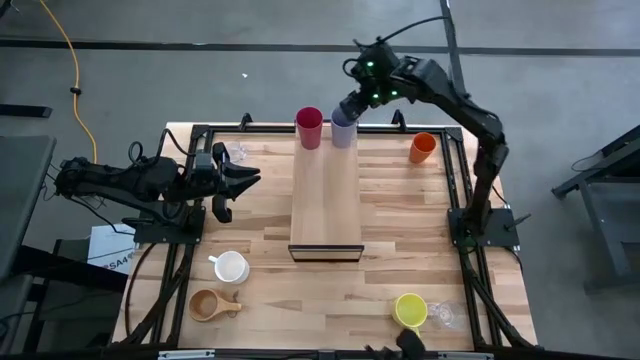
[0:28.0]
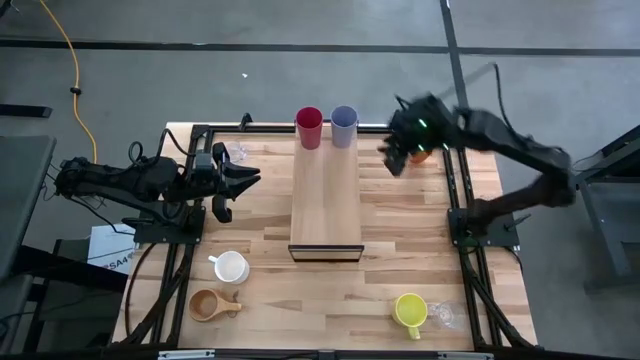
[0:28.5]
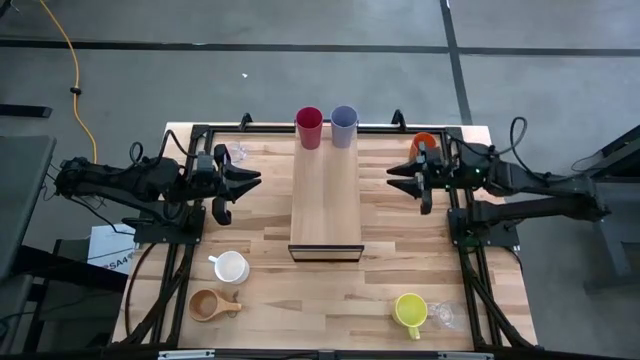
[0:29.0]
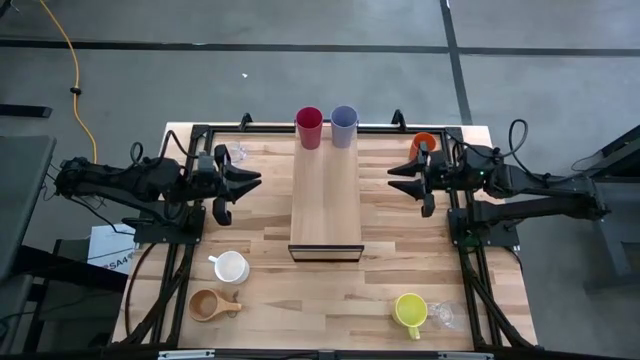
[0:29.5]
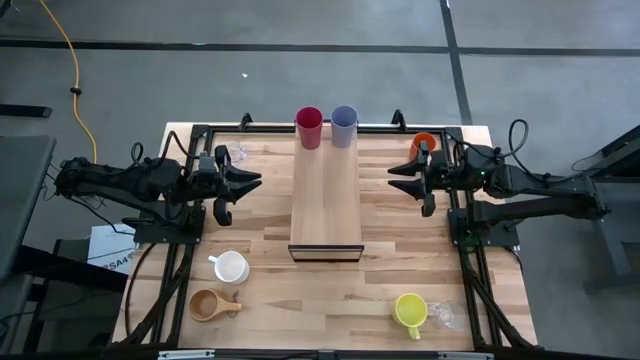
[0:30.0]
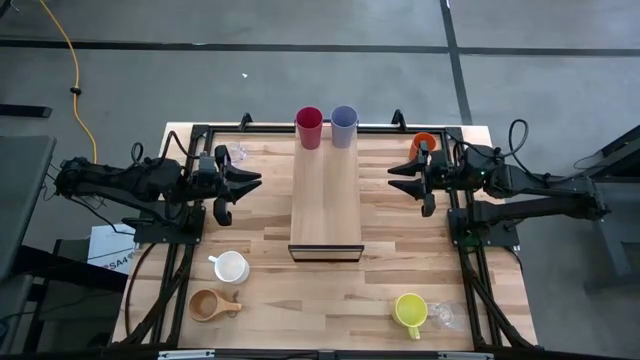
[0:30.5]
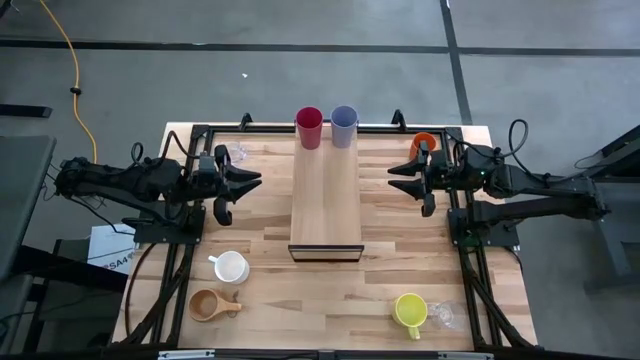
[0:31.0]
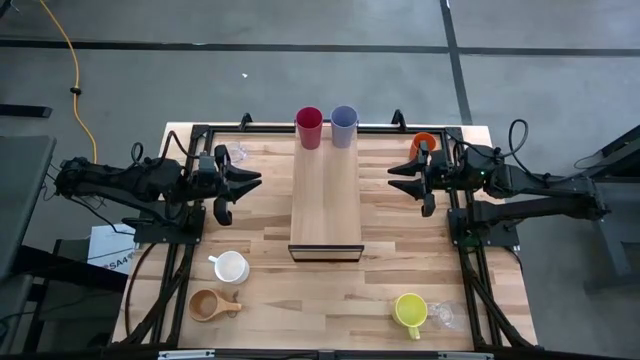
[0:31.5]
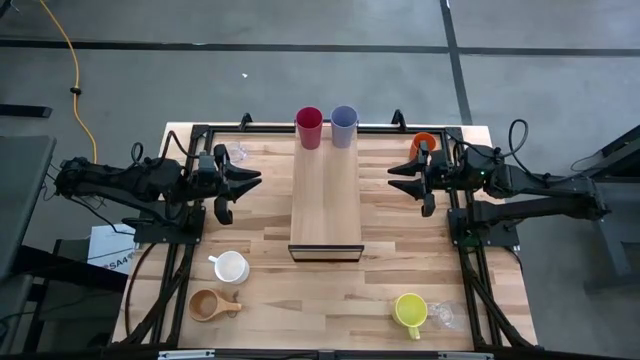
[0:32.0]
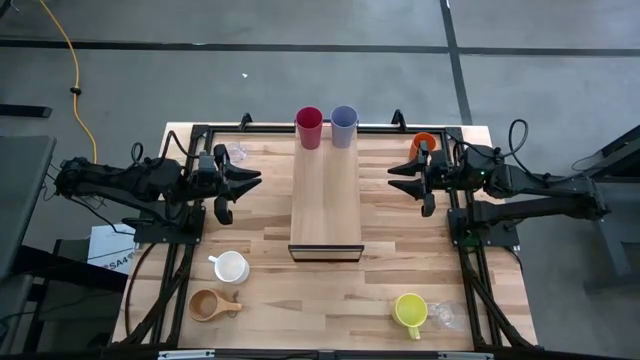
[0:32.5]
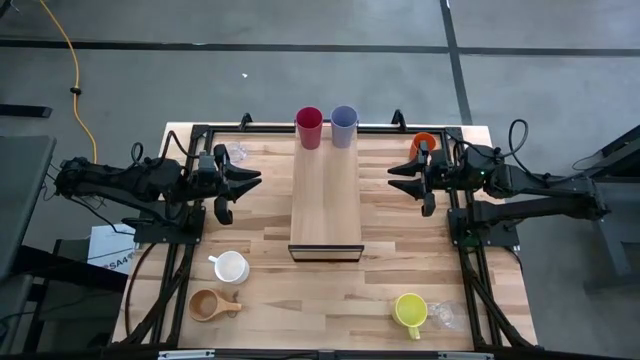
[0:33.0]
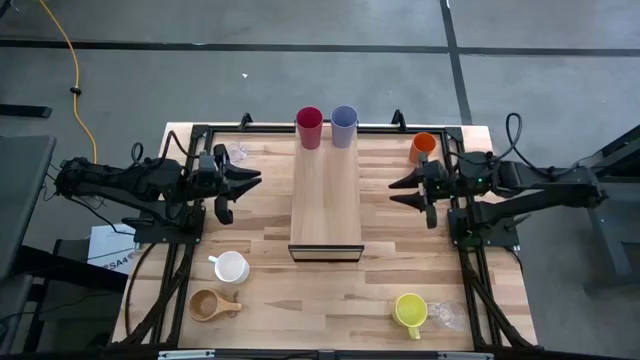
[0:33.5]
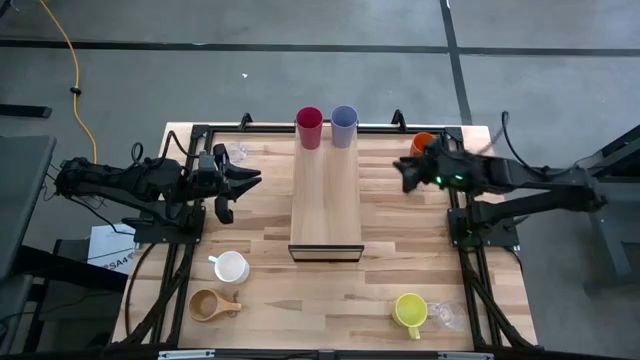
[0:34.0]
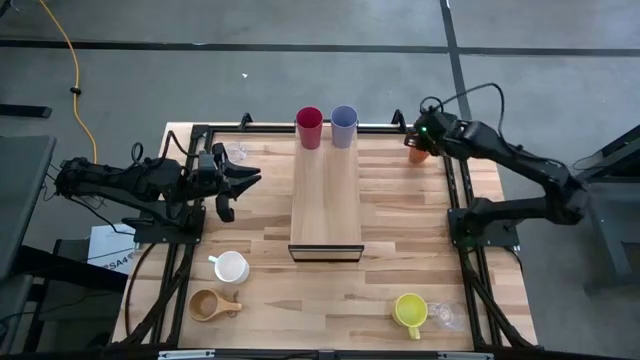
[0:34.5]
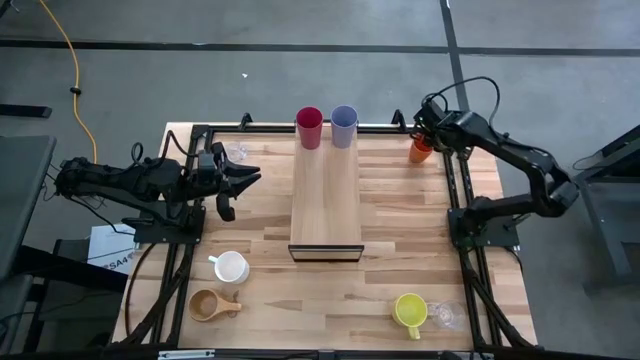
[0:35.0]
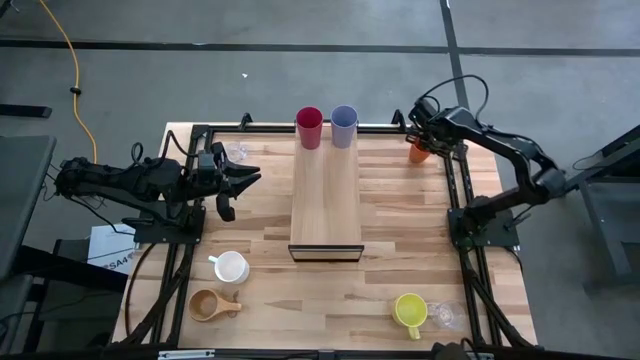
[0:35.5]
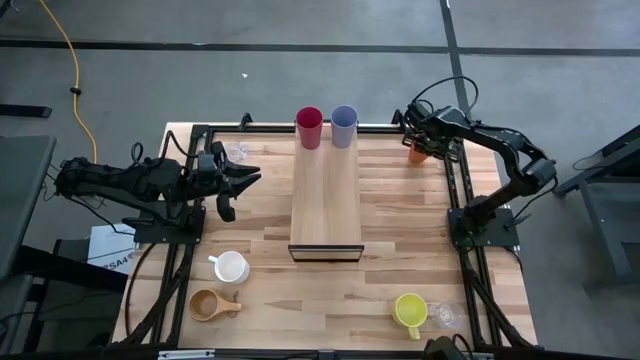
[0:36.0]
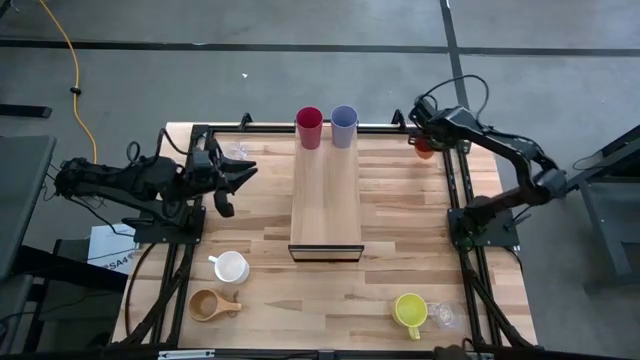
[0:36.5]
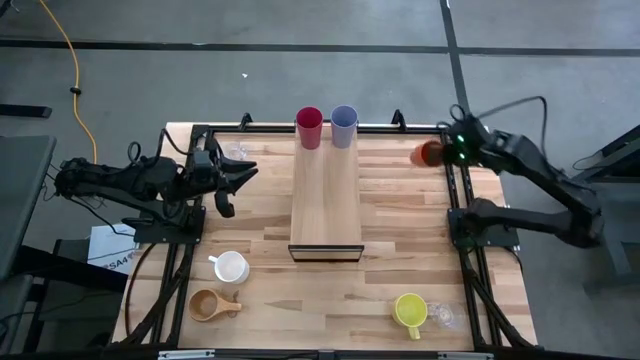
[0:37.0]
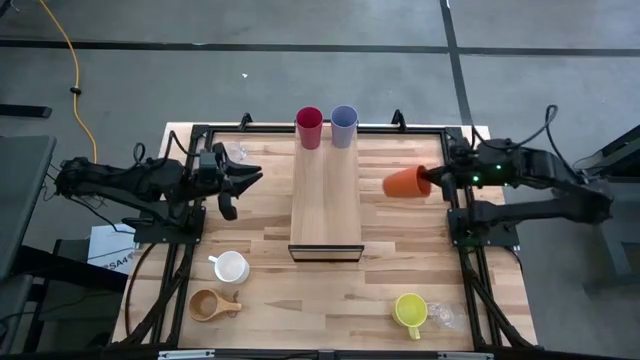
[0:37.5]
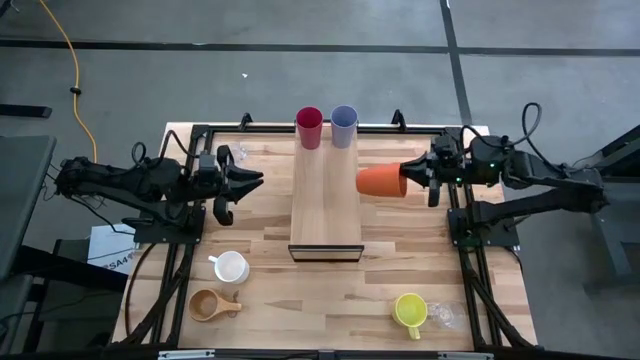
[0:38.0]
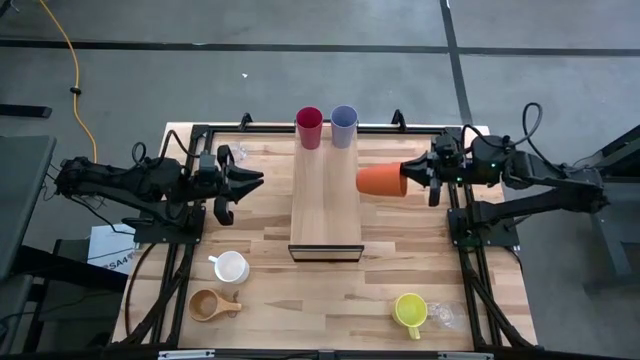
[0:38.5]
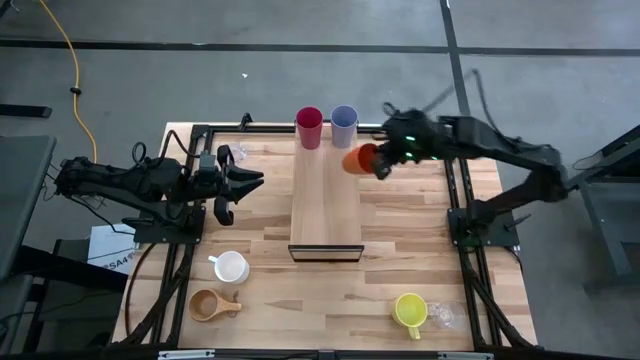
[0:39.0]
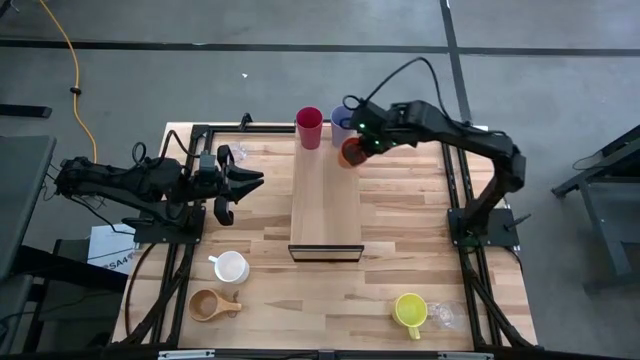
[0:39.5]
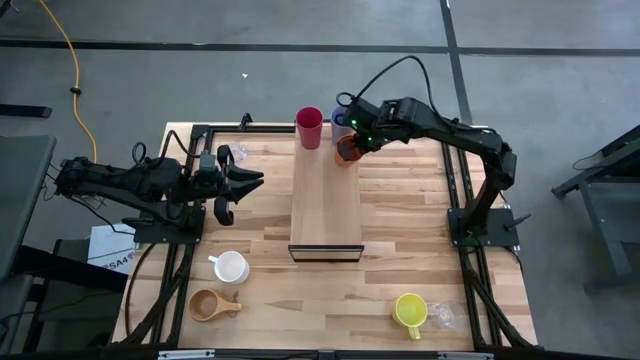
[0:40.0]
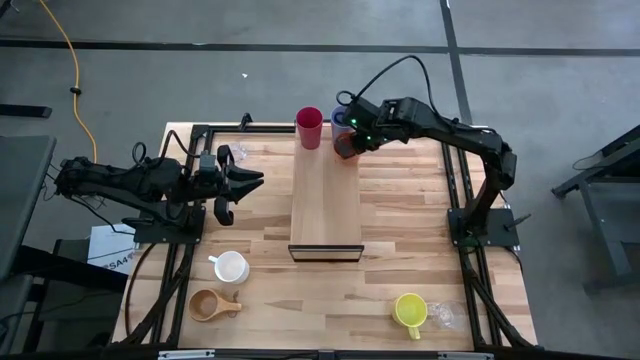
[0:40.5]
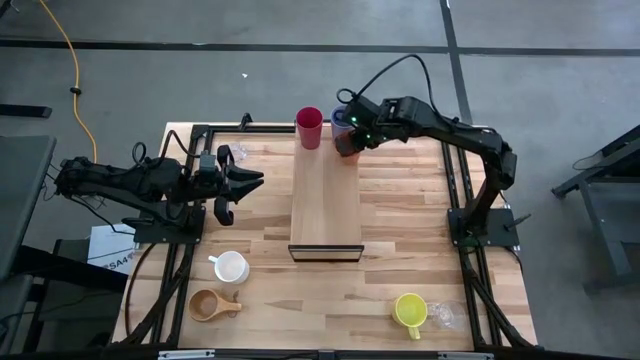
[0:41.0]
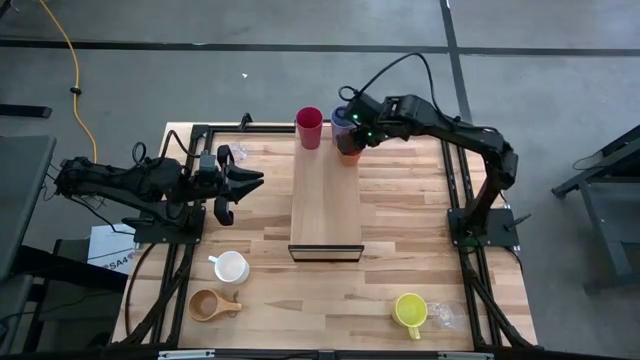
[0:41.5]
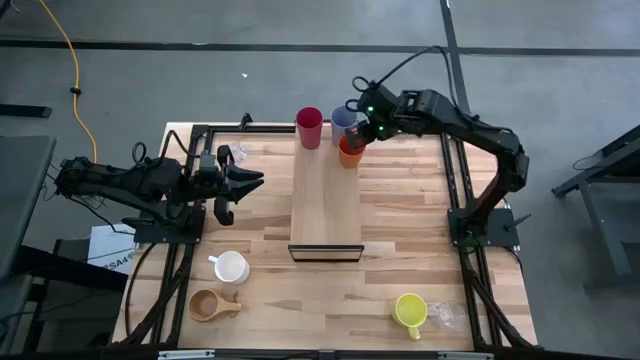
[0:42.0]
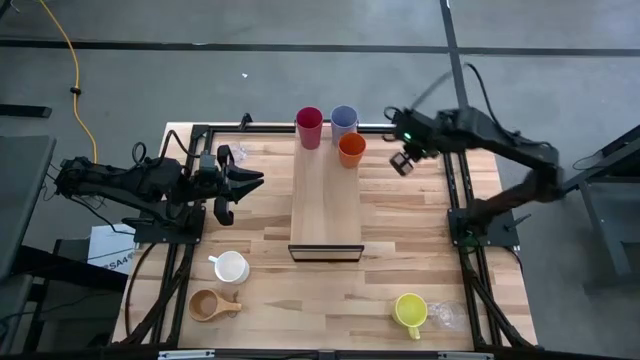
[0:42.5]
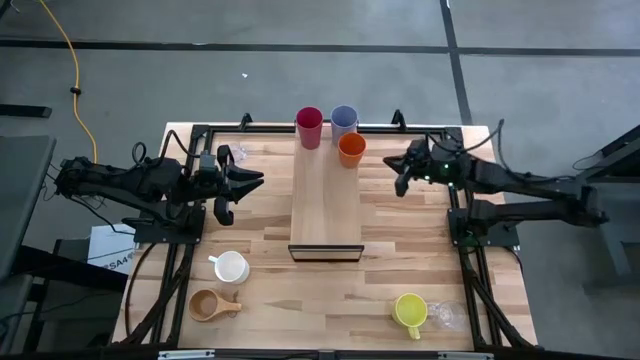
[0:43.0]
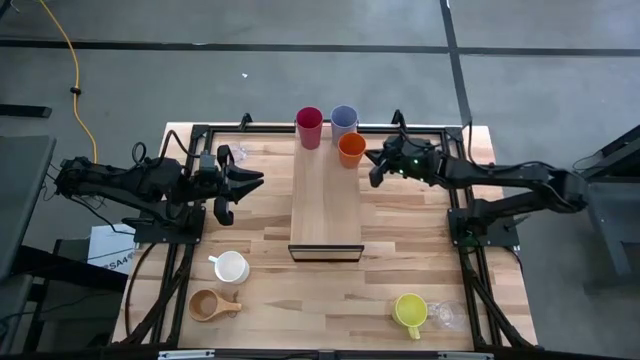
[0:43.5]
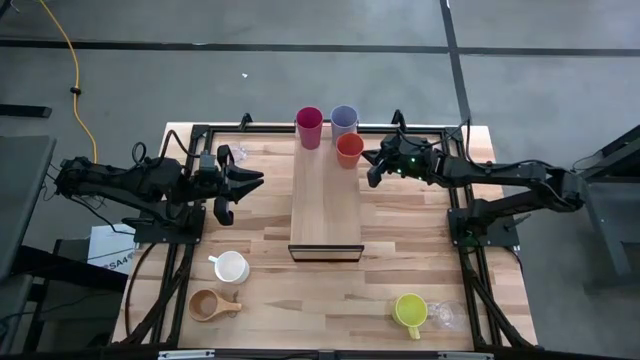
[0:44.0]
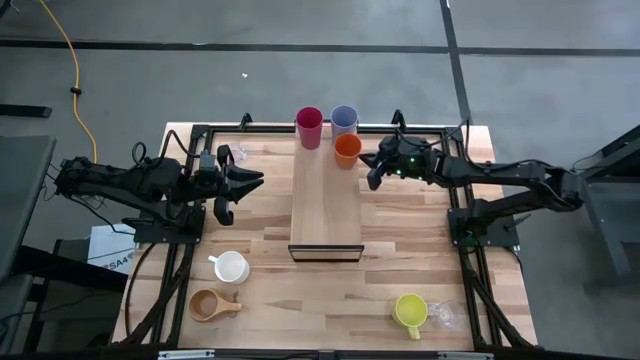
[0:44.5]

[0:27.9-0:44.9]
Task: Stack small to large cups/mugs on shelf
Put the orange cup on the shelf

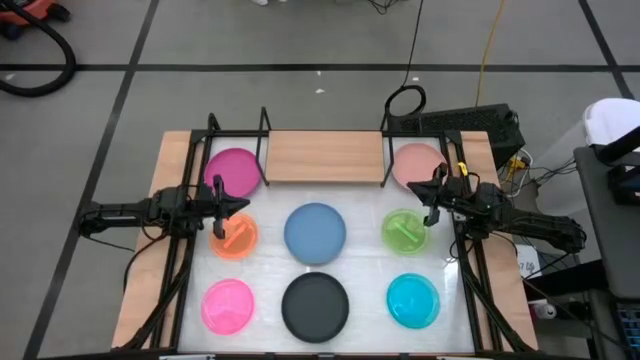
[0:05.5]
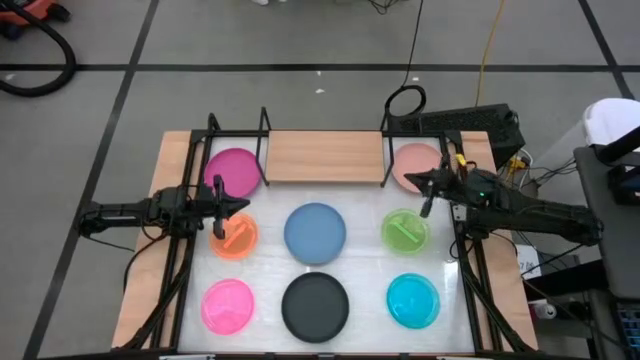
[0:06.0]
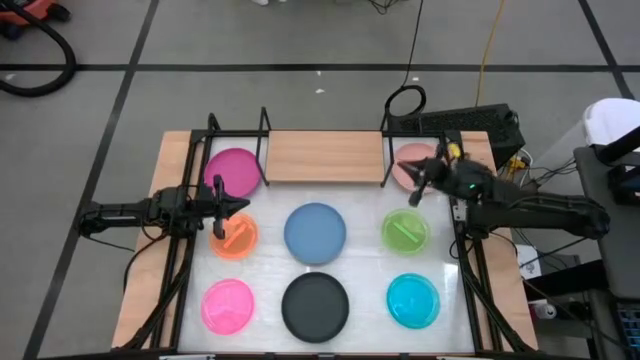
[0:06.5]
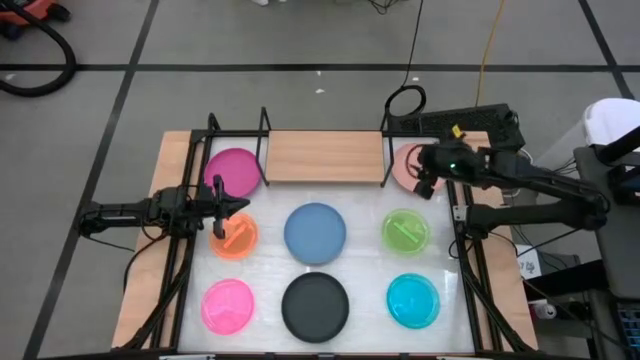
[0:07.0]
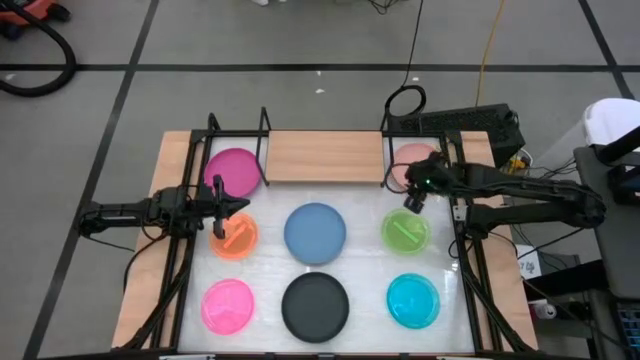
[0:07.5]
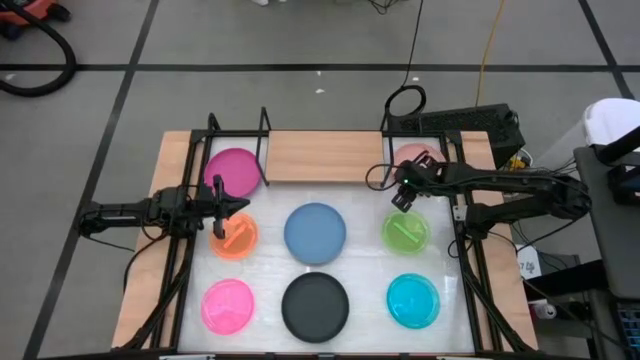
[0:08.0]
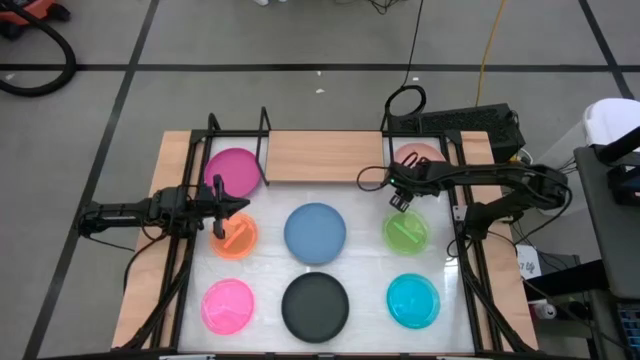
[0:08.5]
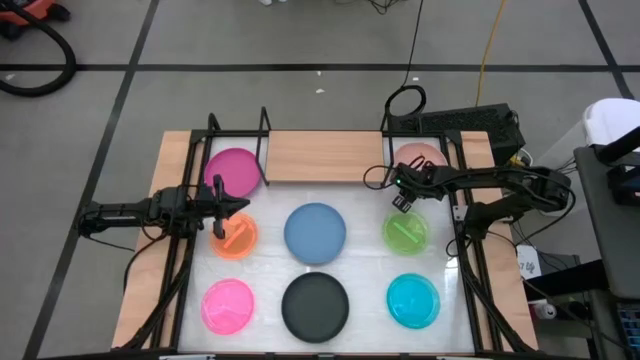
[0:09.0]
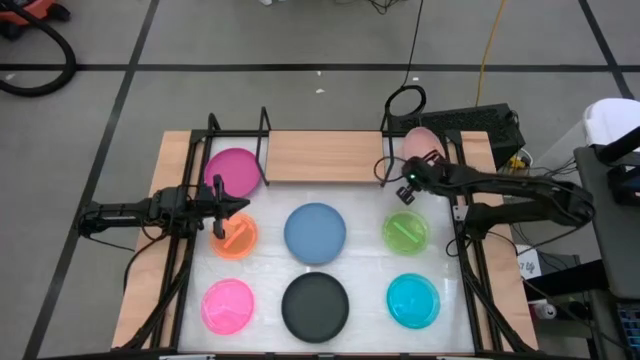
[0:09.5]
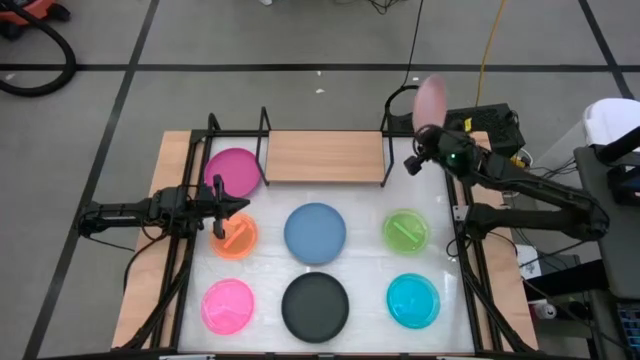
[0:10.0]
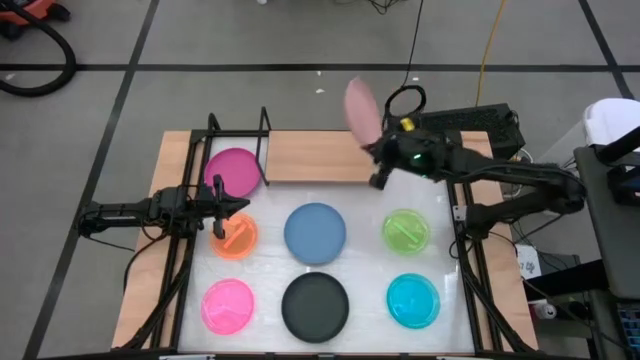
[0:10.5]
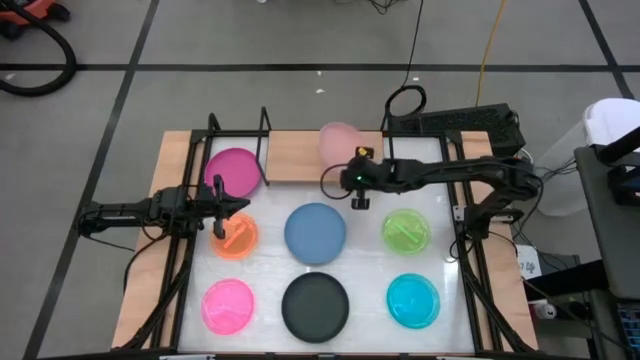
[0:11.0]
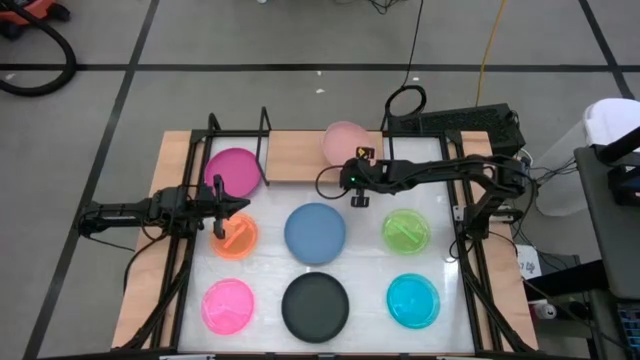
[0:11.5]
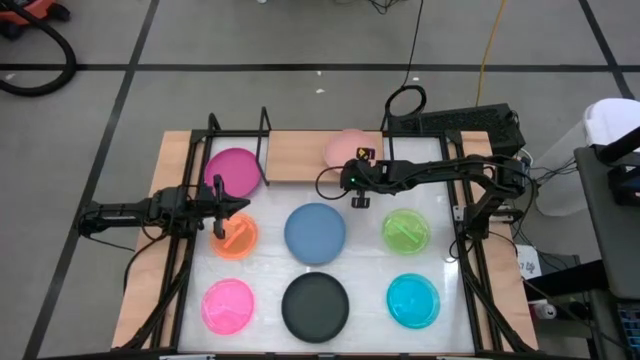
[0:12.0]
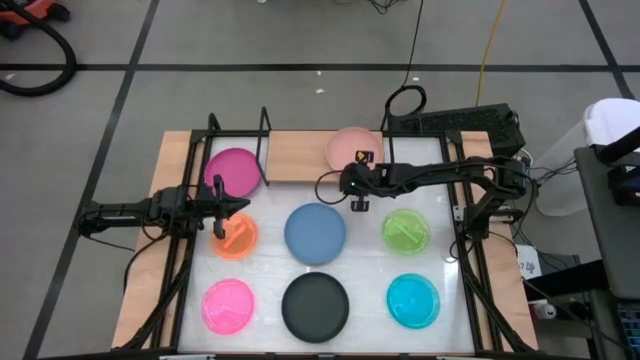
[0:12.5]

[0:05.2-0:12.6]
Task: Place and stack plates onto a shelf
Put the orange plate on the shelf
